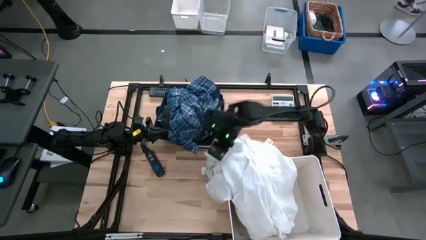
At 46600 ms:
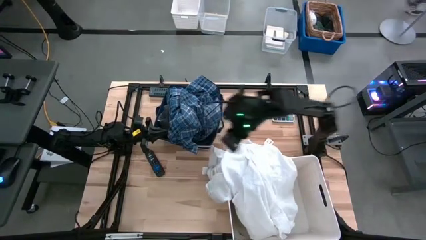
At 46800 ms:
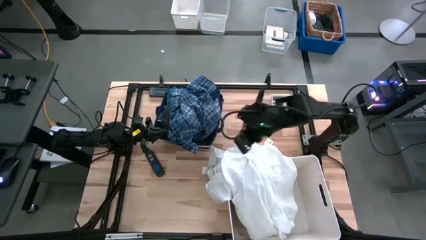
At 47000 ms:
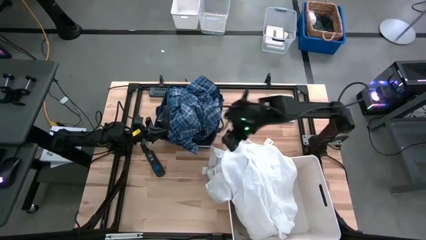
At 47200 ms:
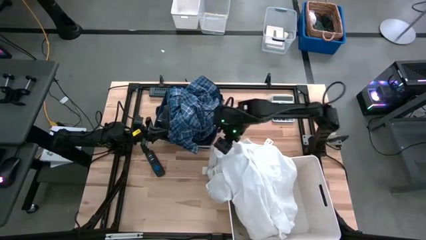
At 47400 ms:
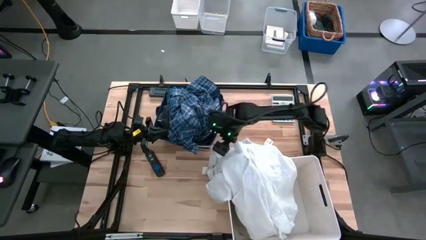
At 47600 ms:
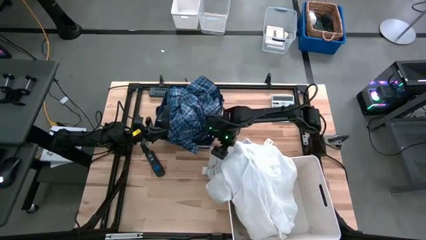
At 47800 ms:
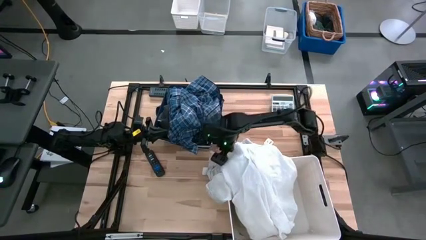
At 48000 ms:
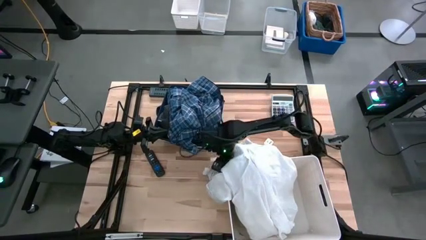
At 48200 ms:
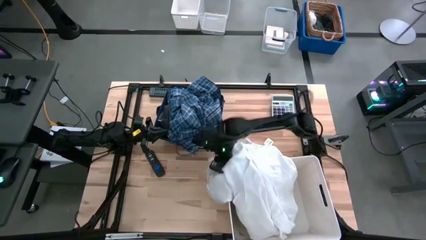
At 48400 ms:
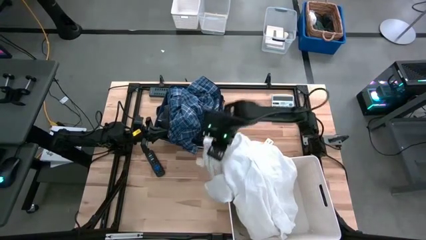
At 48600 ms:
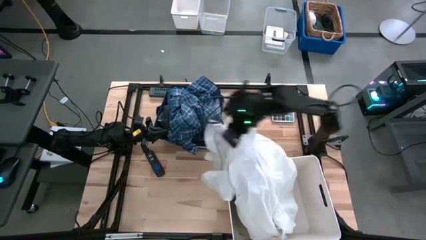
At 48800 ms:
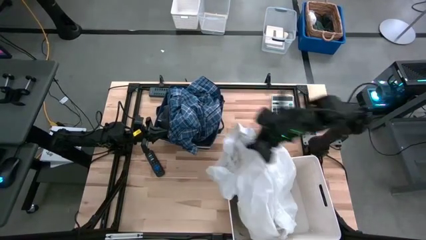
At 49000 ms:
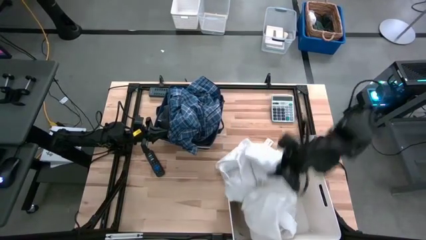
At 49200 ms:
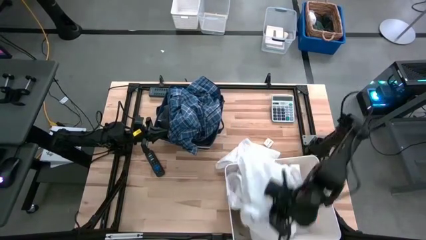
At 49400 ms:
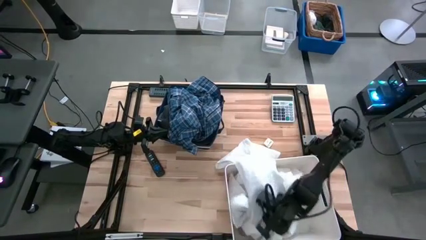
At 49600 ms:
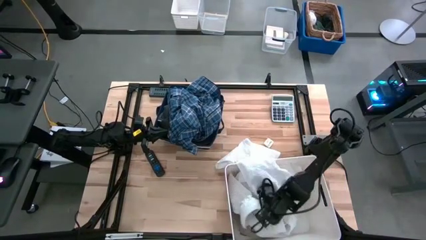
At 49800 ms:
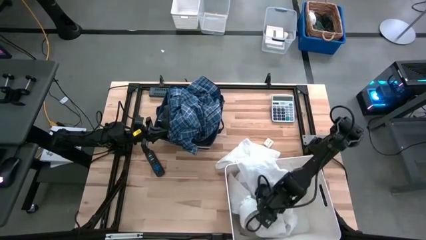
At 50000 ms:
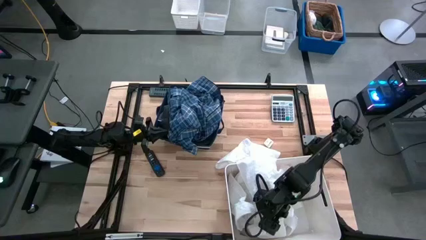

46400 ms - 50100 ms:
Task: Sort clothes
Put the white long sleeve shirt into the white laundry bin

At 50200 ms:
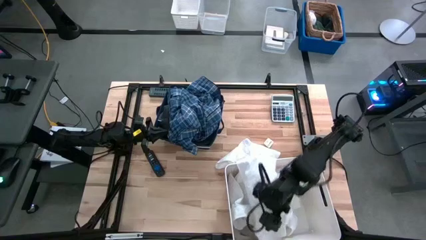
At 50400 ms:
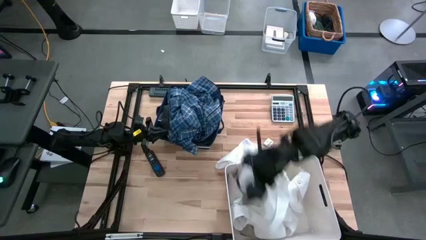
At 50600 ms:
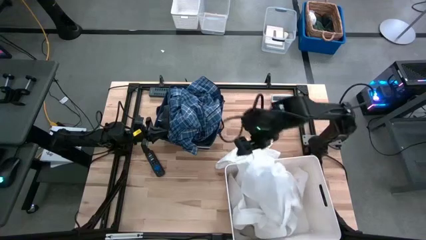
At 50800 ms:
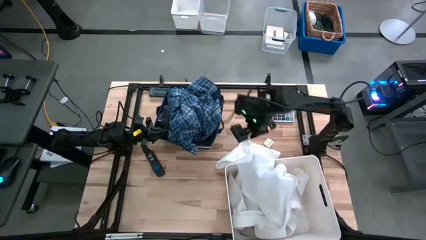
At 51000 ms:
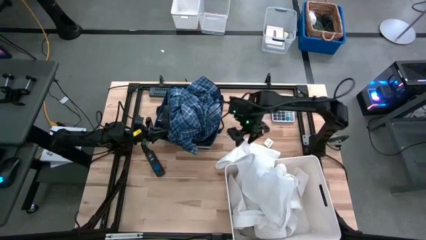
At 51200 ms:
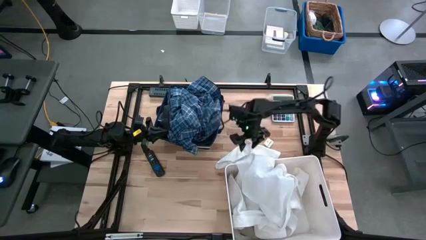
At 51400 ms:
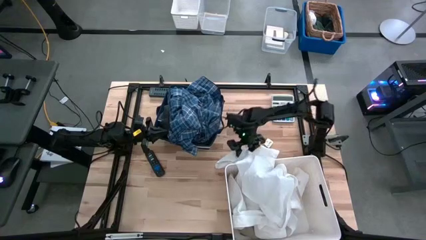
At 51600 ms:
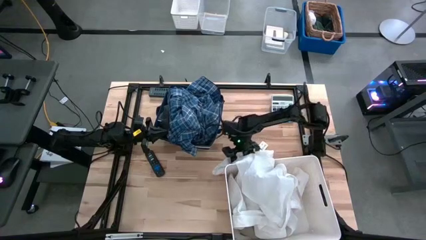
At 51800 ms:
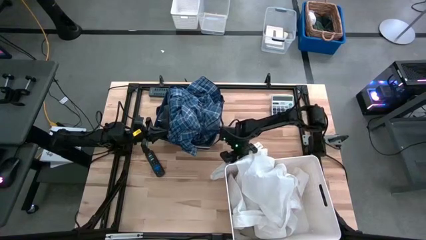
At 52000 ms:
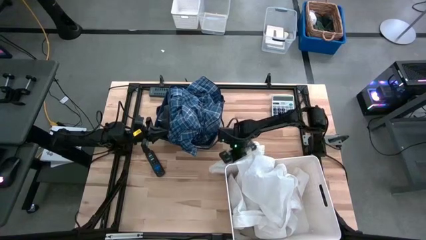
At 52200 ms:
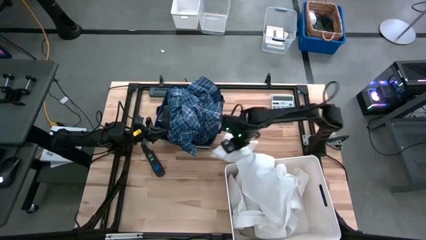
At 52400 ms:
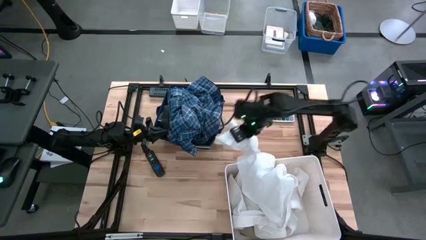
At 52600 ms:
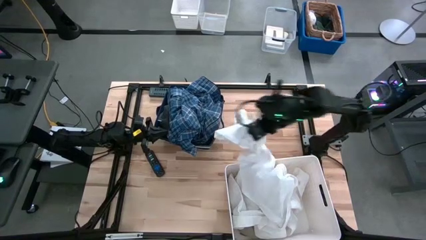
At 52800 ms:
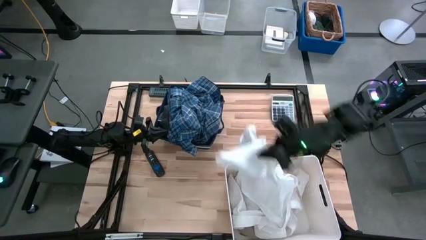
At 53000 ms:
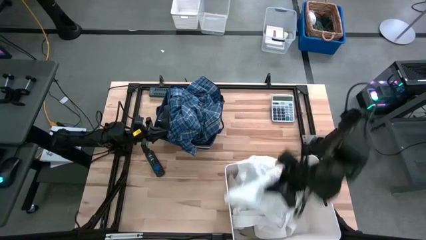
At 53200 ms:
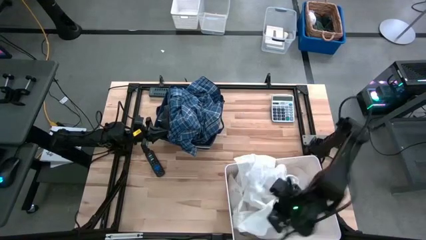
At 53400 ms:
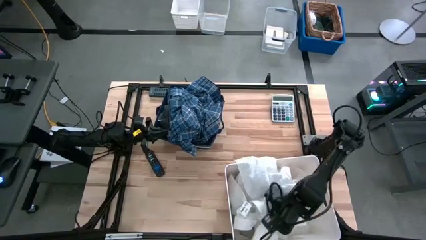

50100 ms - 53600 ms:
Put the white underwear into the white laundry bin

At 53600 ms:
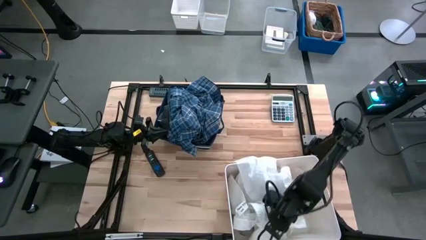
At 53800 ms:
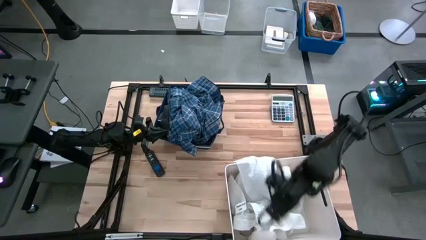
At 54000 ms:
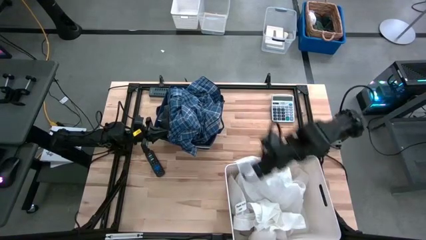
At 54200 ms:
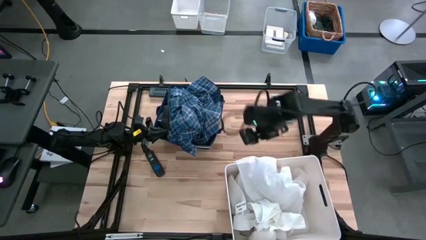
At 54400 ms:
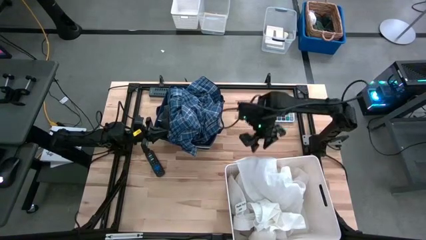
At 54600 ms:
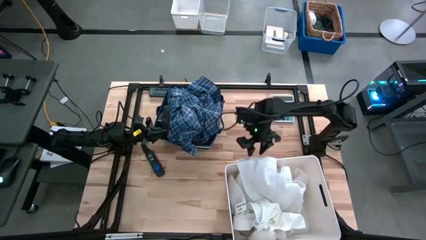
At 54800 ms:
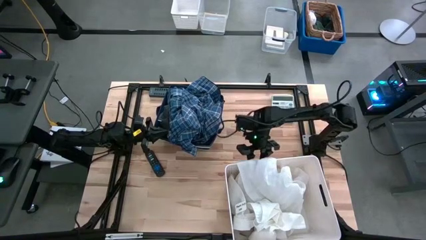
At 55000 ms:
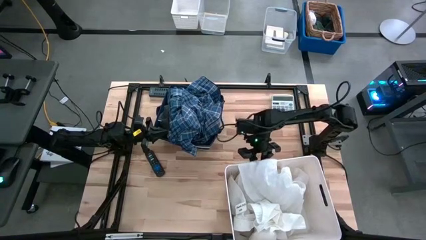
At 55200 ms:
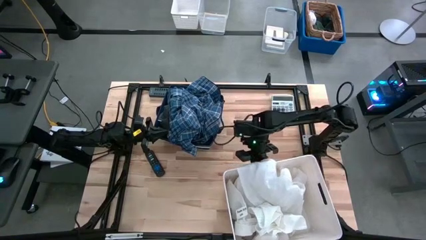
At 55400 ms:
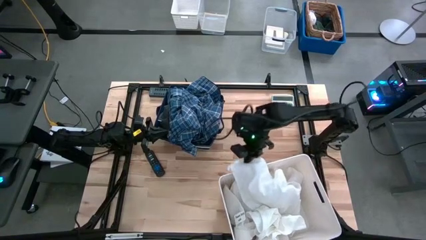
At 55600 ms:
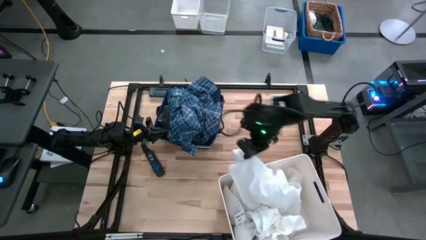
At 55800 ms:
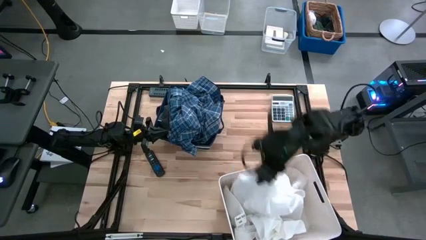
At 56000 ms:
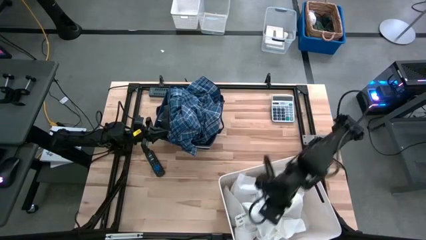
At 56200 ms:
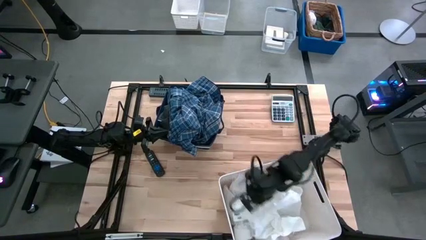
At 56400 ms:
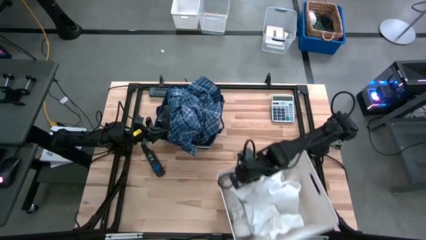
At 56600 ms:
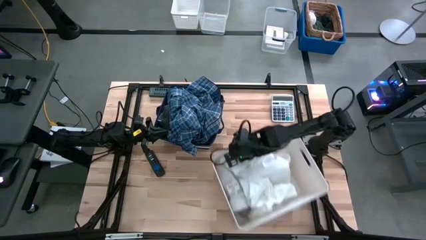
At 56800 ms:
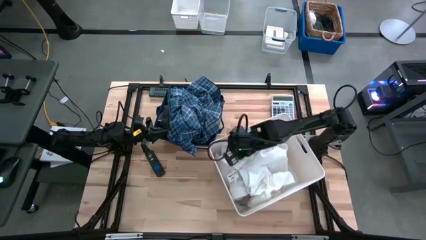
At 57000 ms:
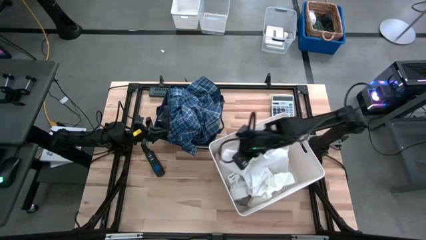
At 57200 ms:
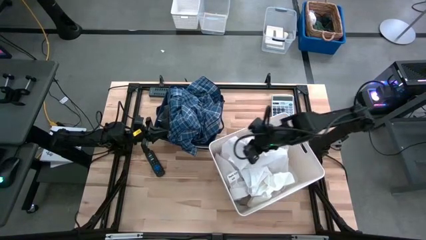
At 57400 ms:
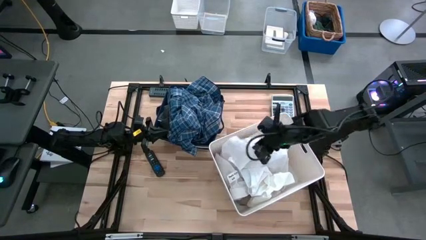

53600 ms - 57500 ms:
Adjust the white long sleeve shirt in the white laundry bin

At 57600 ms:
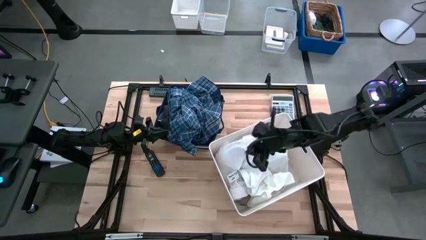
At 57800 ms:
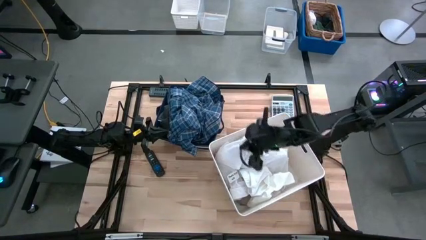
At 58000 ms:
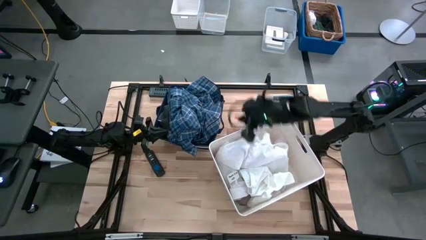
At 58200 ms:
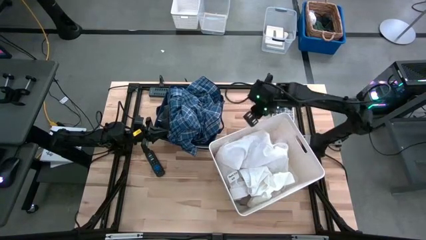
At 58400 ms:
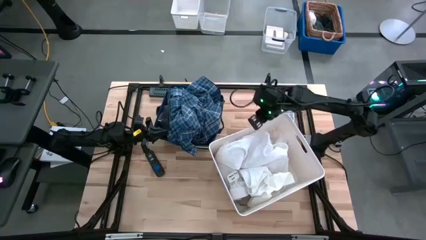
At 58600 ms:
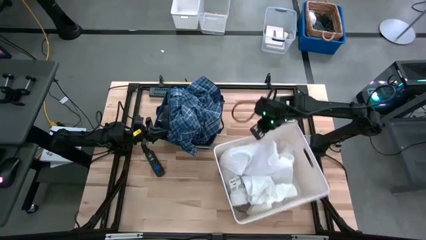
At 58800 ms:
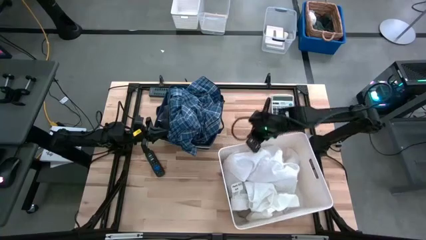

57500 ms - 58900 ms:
Adjust the white laundry bin on the table

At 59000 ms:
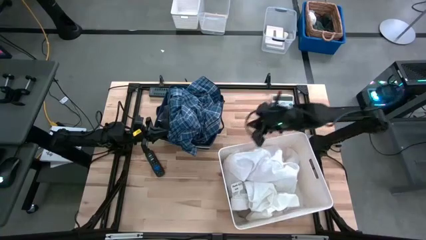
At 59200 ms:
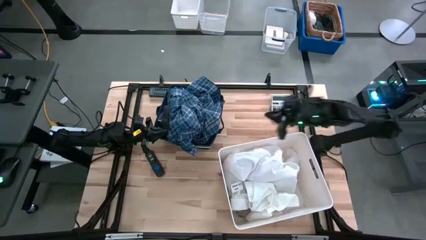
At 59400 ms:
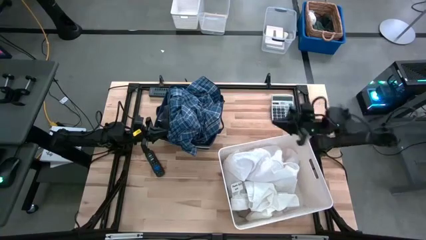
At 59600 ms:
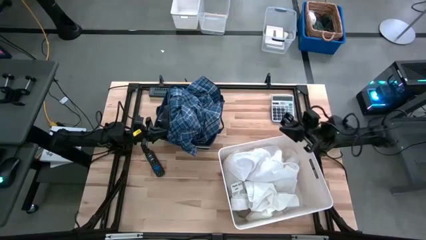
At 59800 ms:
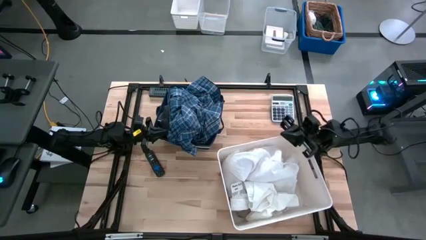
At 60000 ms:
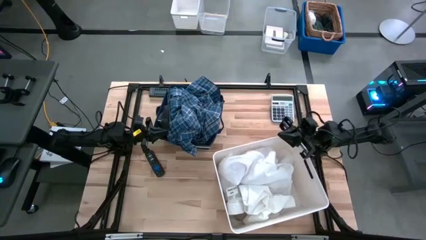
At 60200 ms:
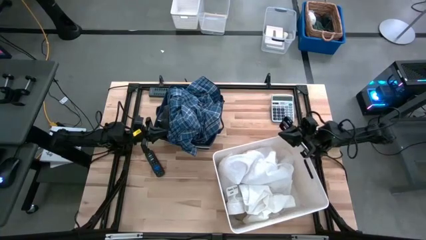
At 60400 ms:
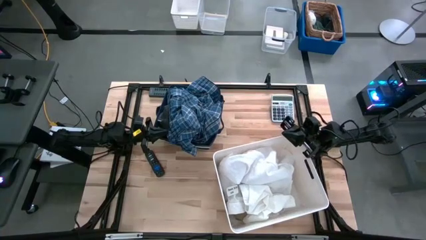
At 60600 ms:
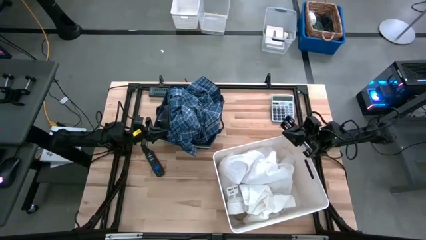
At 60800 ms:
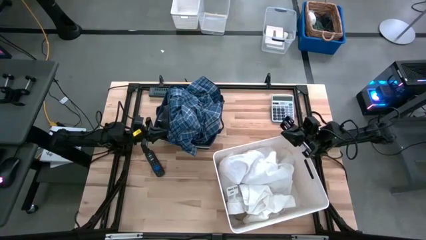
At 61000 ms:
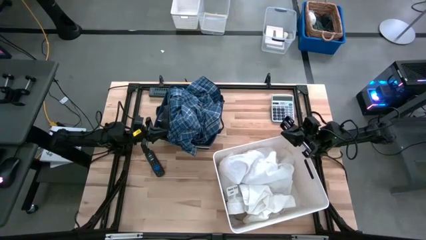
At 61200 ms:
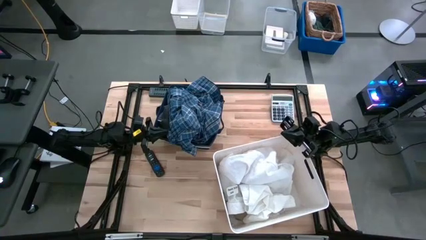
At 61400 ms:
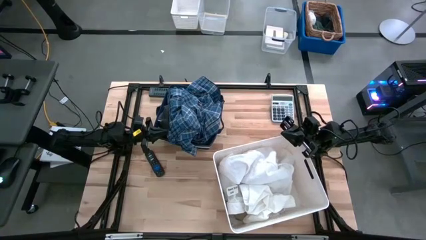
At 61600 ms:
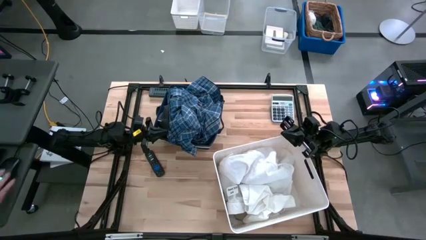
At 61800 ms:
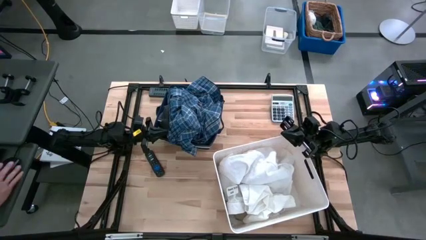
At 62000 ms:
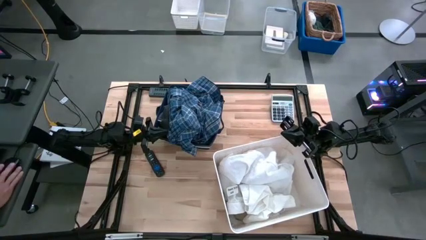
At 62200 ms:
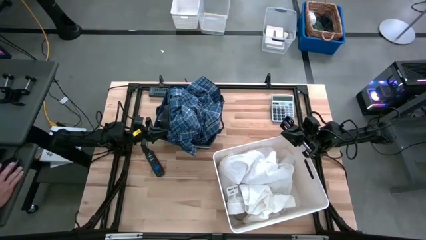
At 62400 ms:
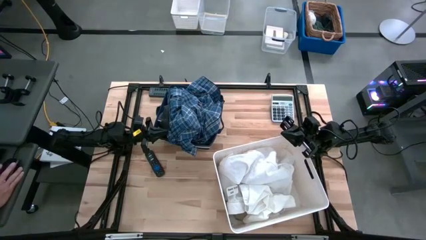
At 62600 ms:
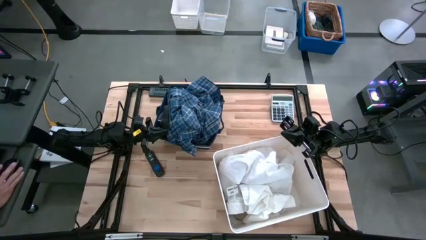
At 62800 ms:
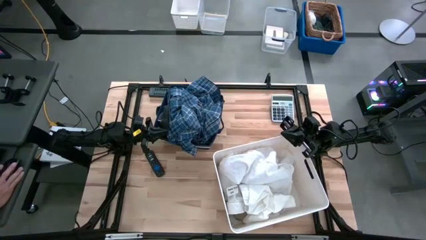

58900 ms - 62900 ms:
Return to Home Position
